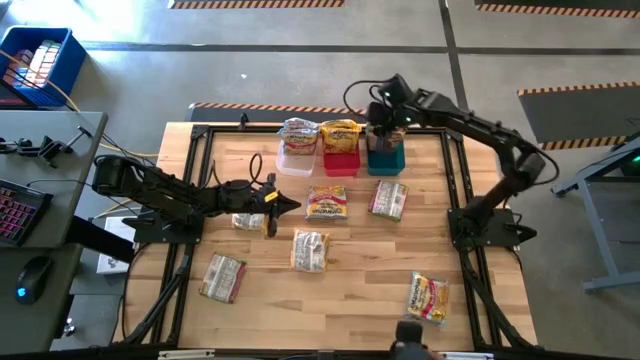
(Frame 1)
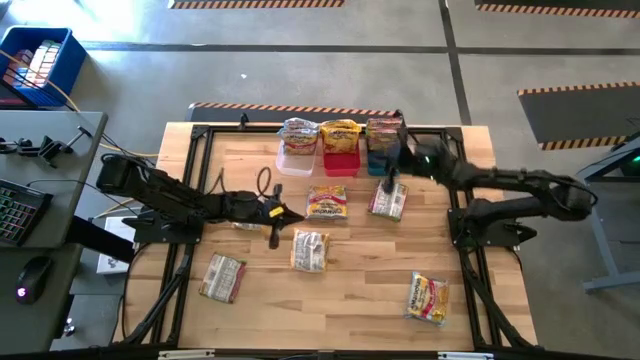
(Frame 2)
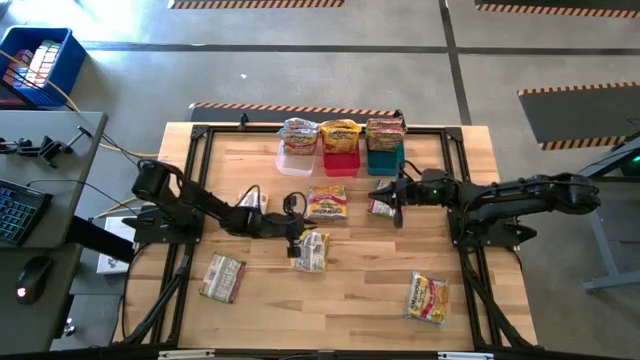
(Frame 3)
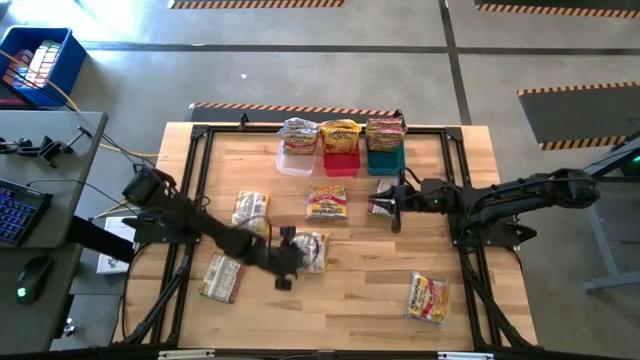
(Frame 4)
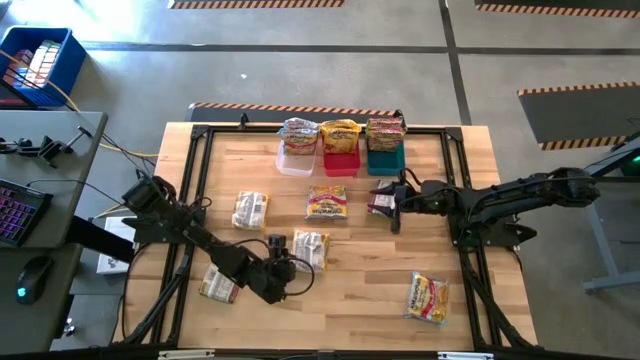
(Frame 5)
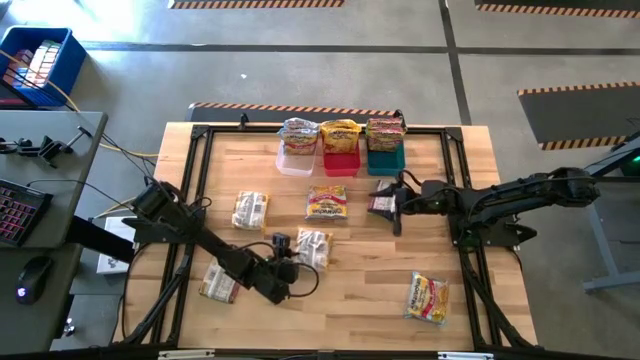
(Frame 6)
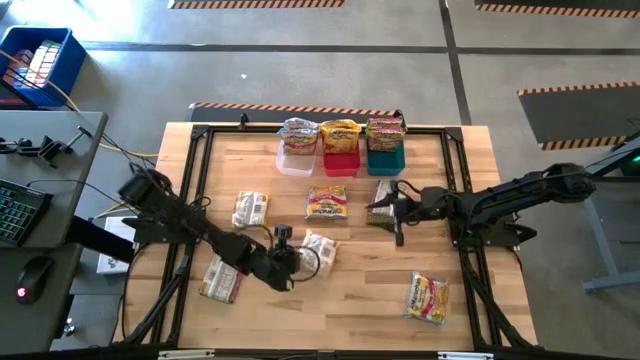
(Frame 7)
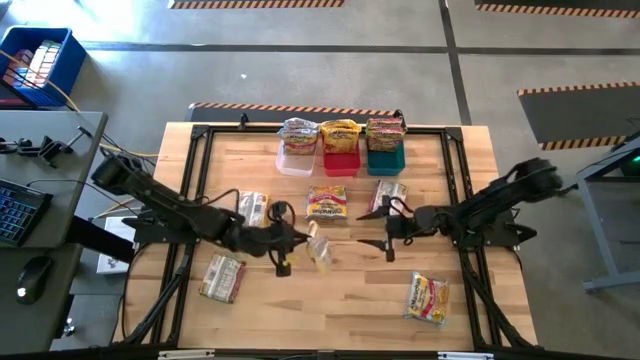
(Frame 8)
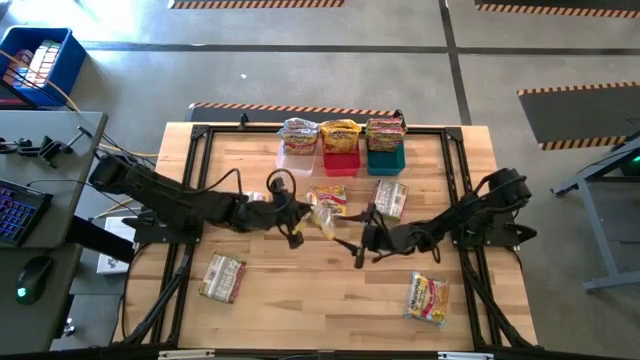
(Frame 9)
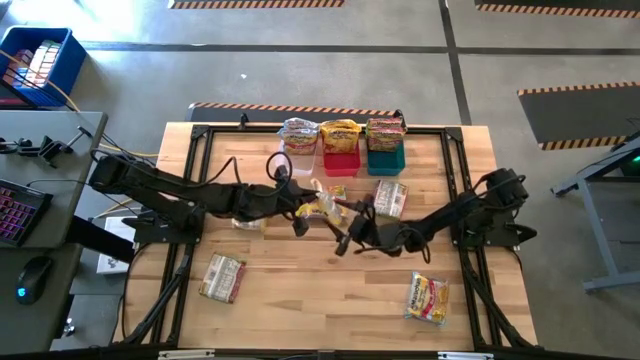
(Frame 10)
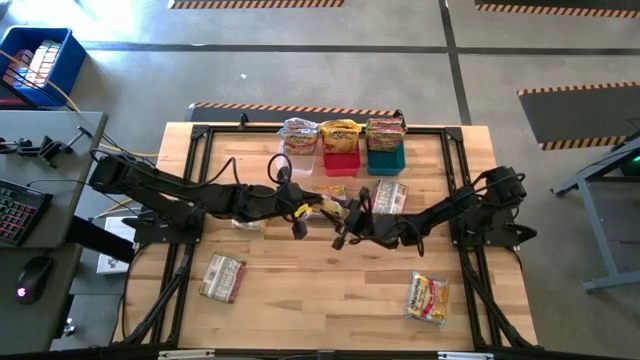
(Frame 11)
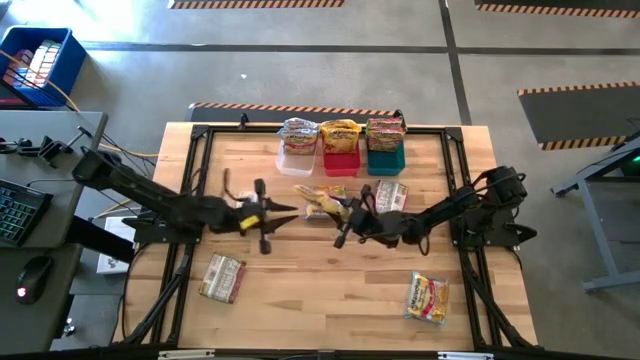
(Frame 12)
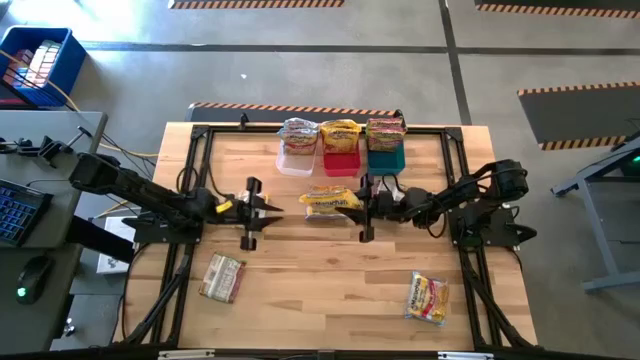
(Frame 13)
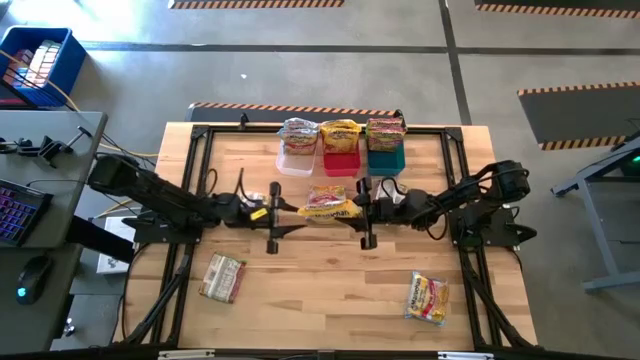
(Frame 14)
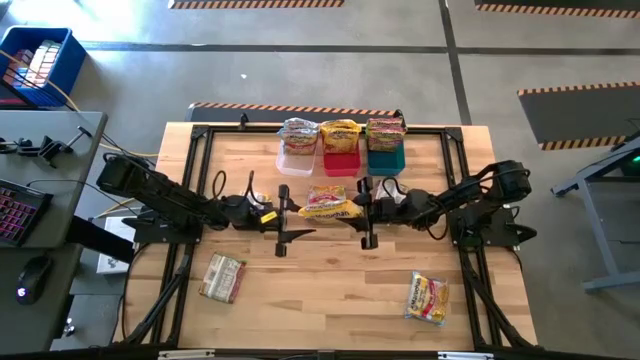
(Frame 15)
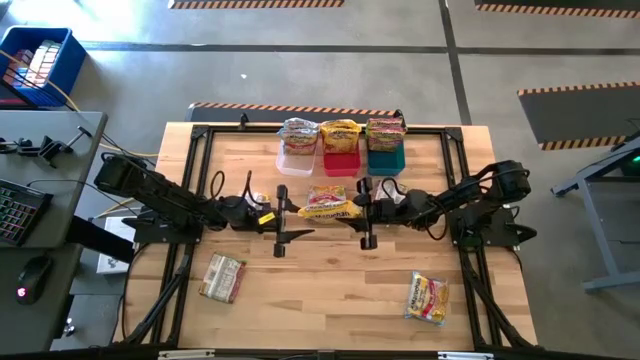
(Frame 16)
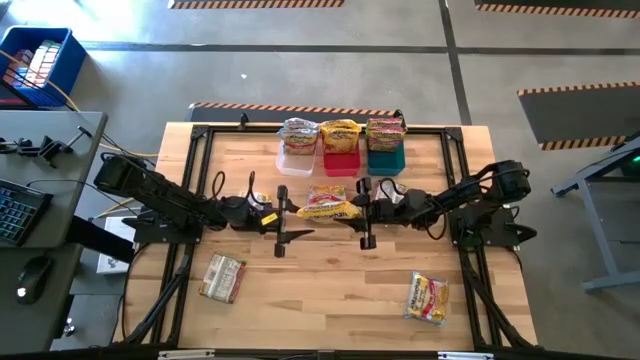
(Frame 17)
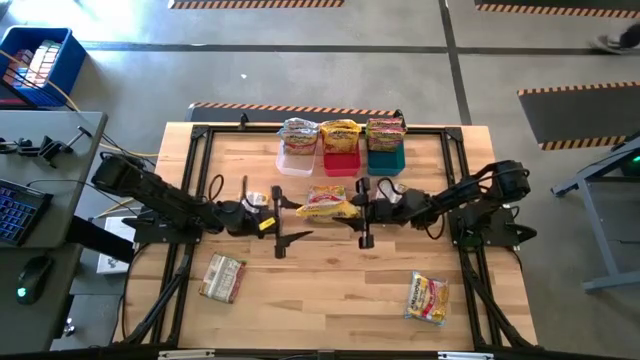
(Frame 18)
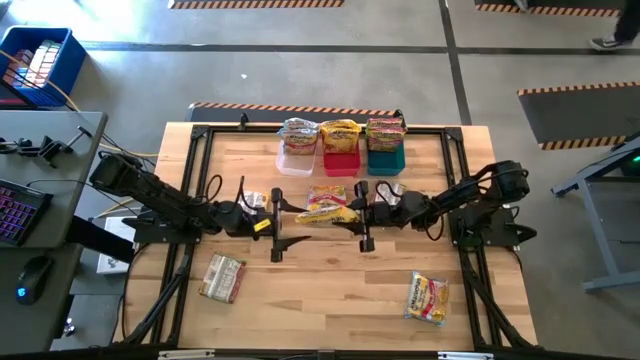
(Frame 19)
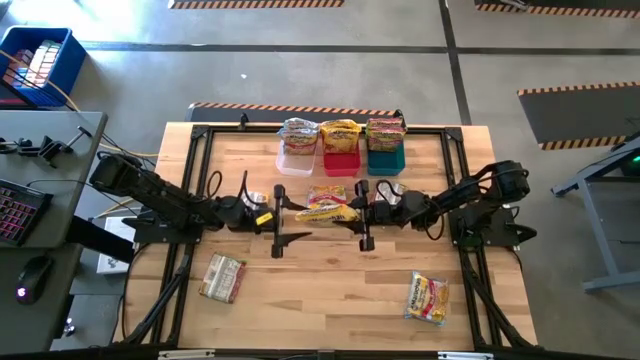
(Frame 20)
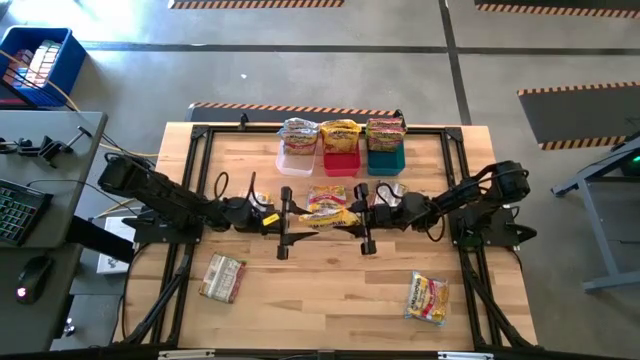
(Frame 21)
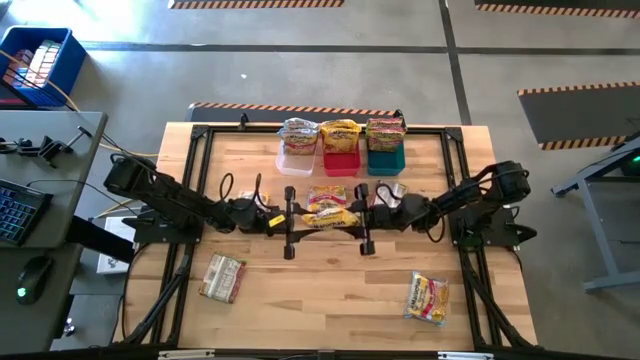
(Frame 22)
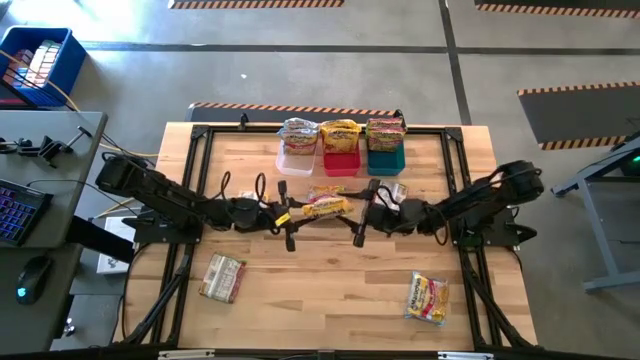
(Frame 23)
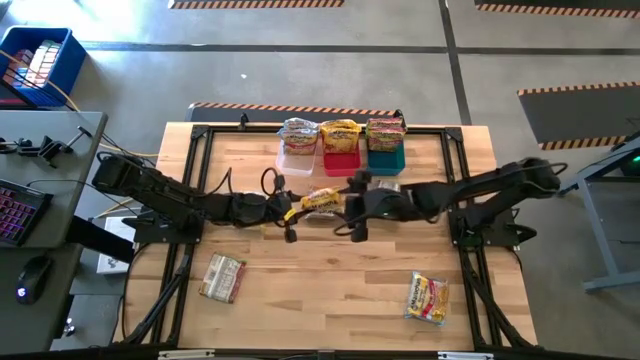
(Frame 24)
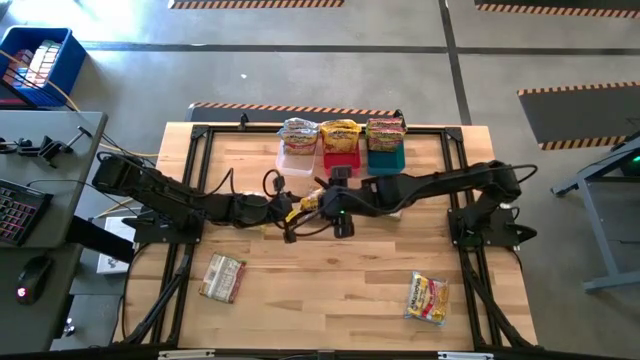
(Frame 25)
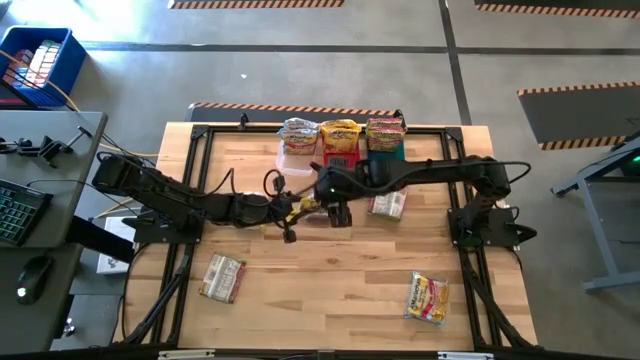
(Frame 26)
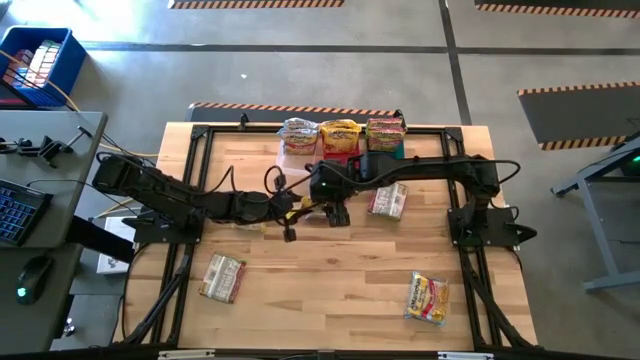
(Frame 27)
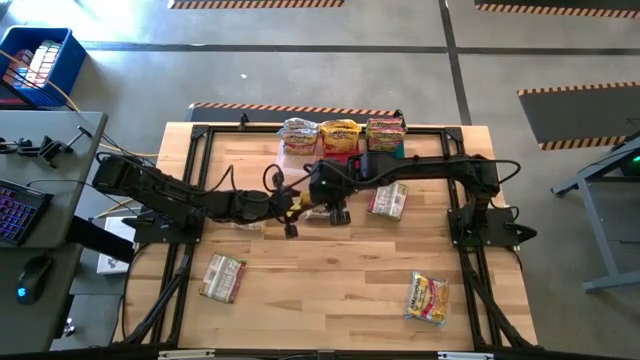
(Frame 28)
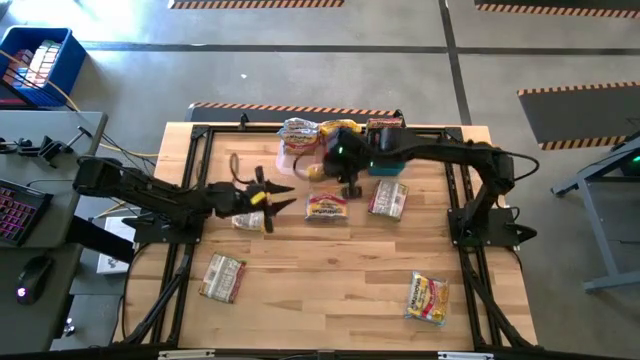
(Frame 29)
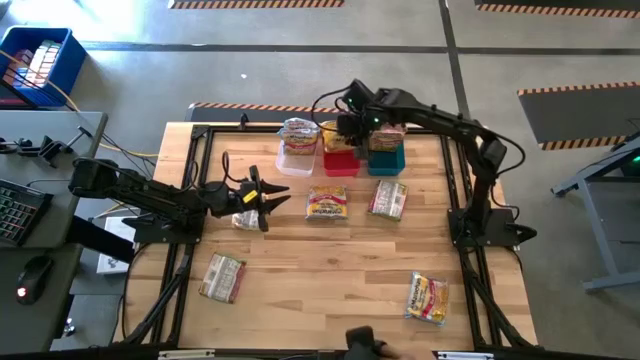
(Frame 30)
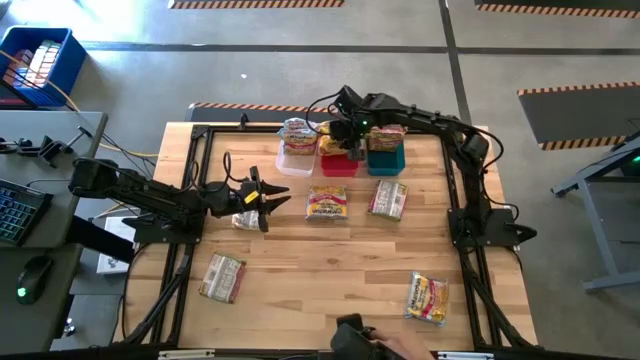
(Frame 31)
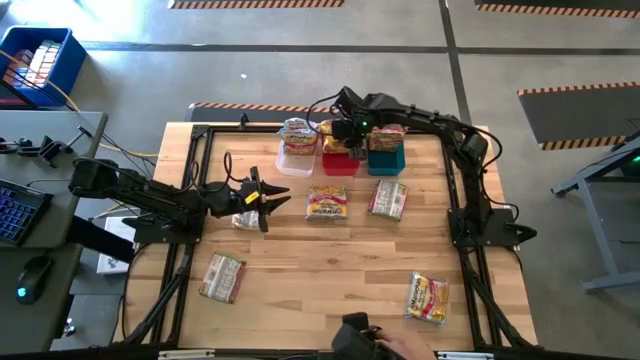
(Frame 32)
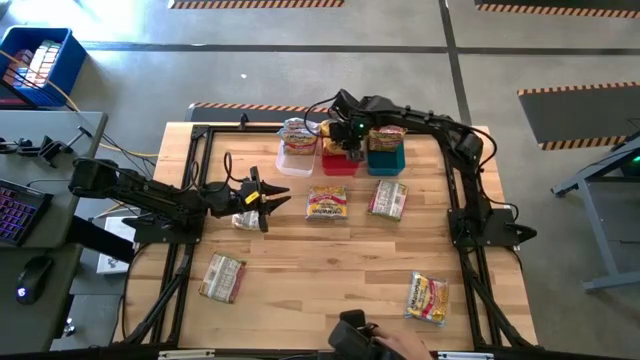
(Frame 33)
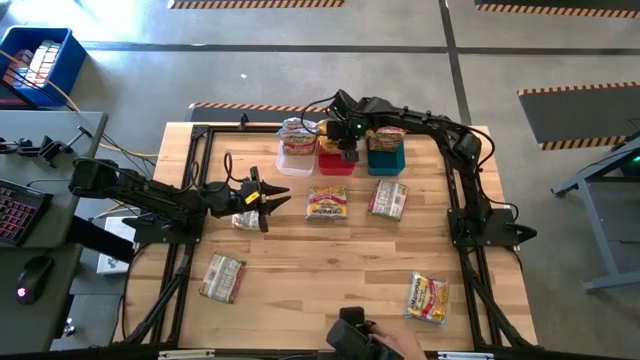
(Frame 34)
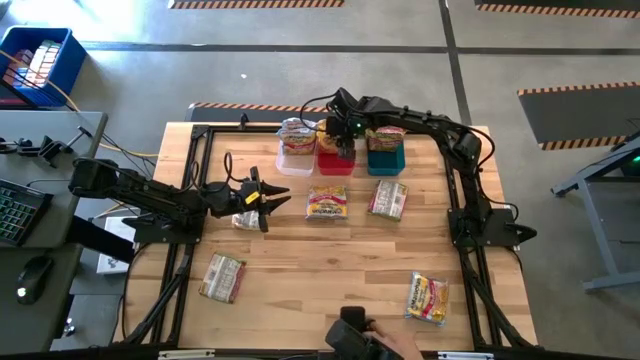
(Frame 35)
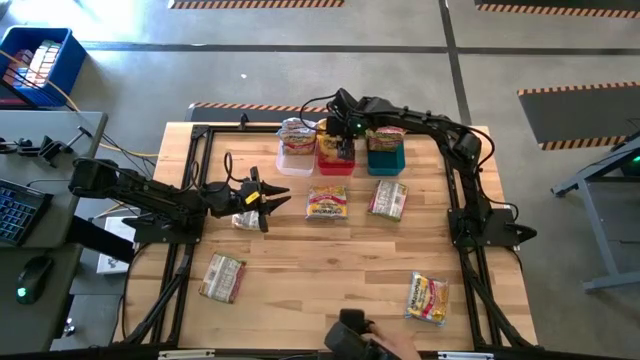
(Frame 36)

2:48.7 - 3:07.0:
Task: Sort Maruchan noodles
Put the yellow noodle pack into the red bin

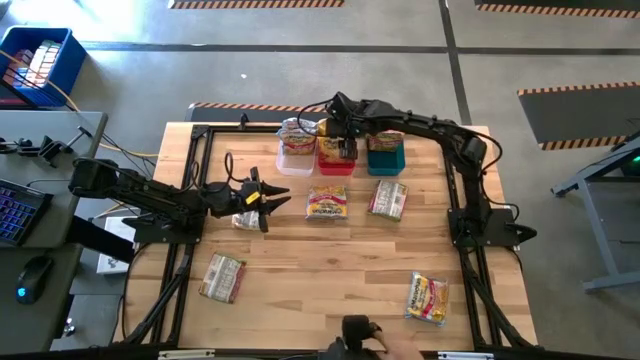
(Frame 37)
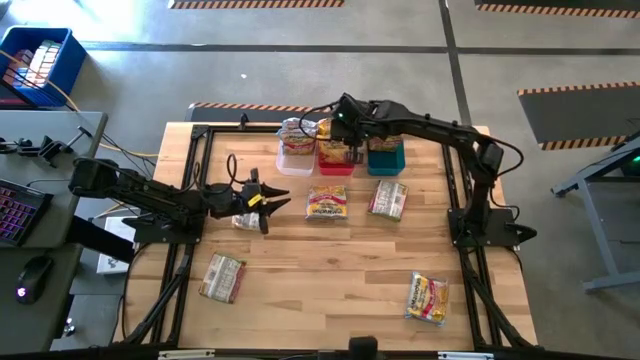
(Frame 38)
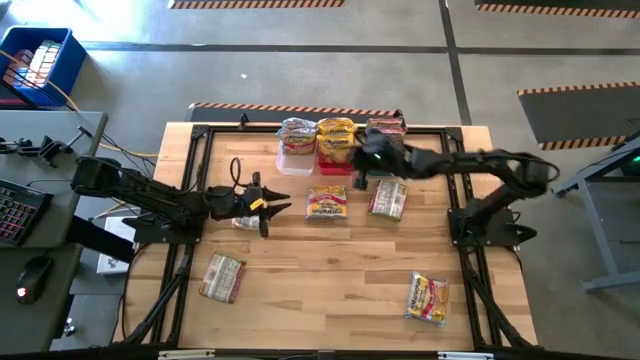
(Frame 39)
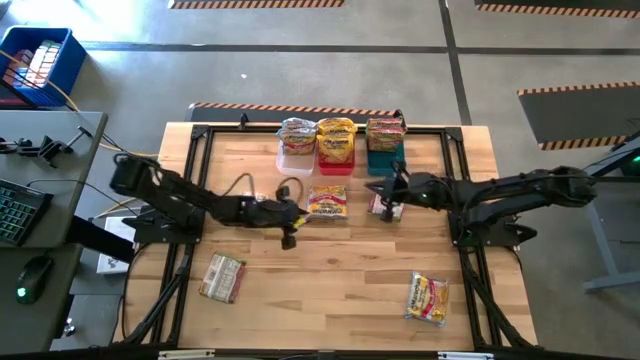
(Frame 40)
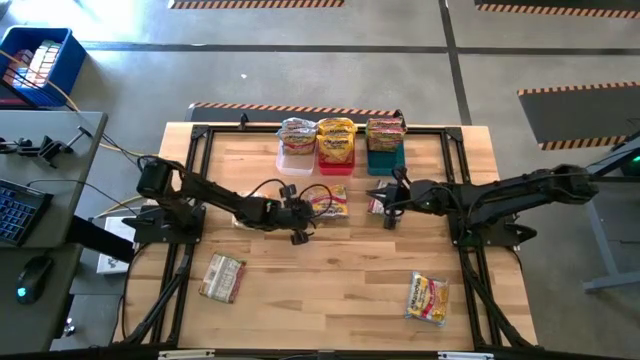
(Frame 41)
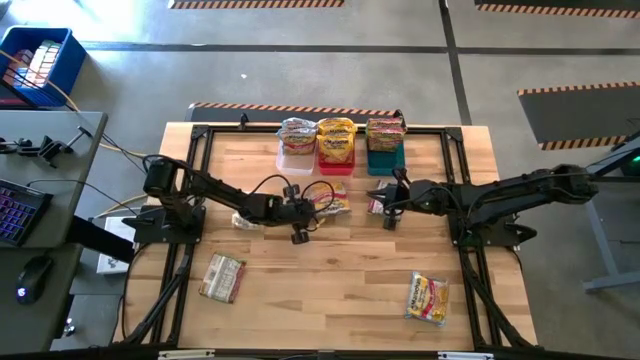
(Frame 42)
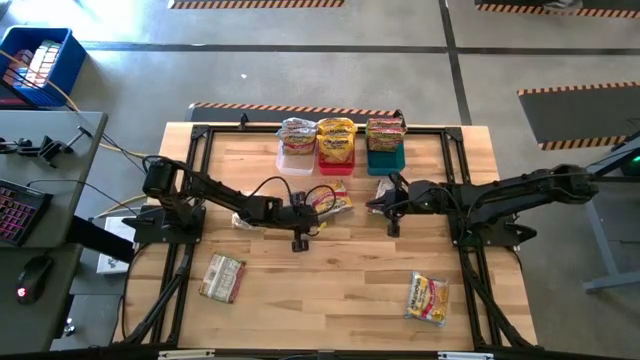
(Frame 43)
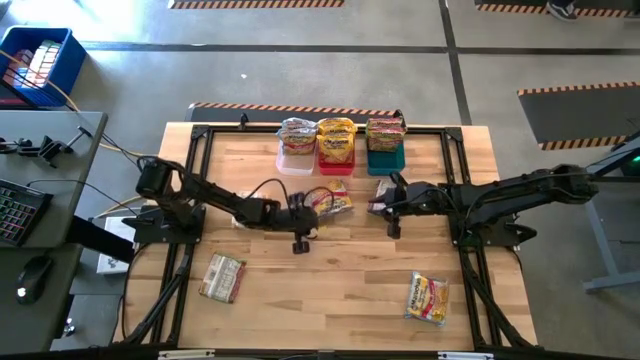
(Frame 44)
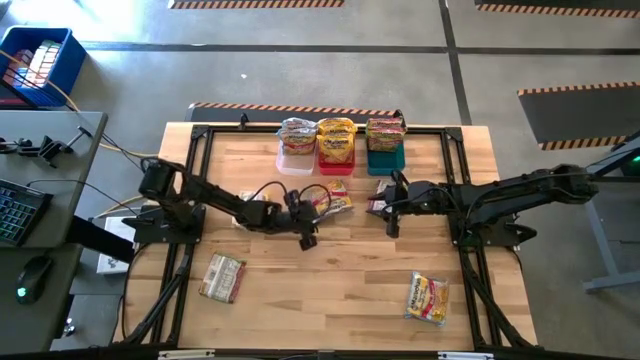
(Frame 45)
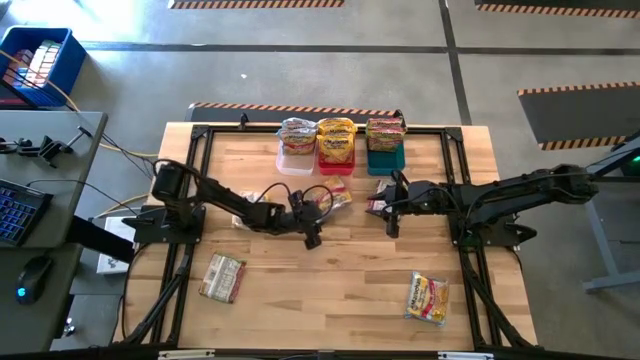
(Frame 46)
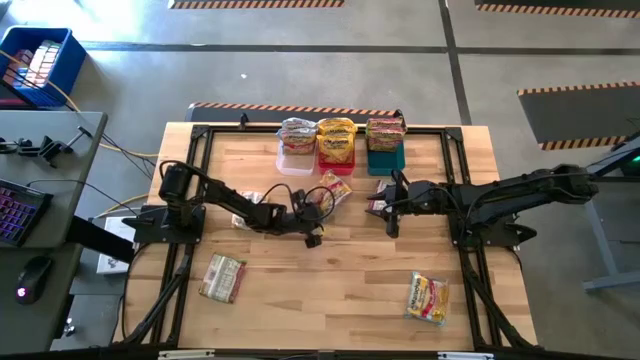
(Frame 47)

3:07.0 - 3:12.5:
Put the blue noodle pack into the transparent bin
